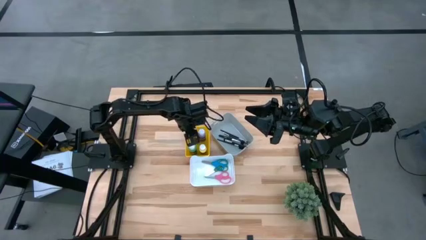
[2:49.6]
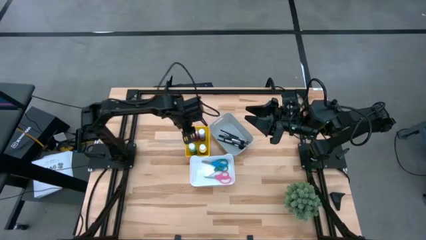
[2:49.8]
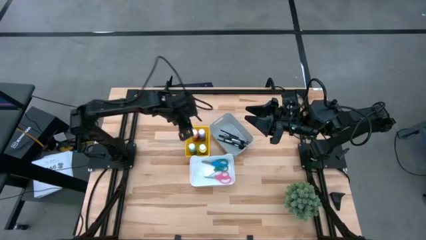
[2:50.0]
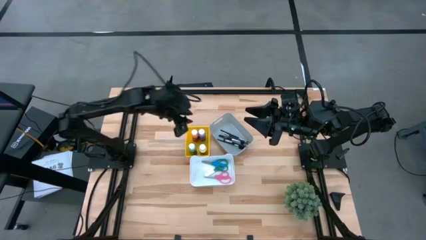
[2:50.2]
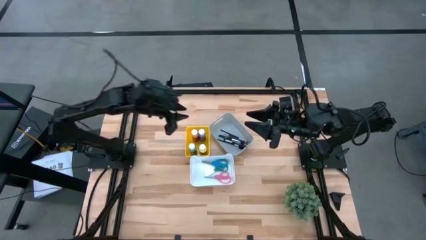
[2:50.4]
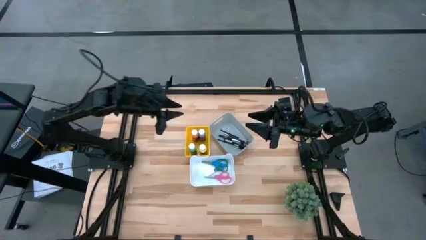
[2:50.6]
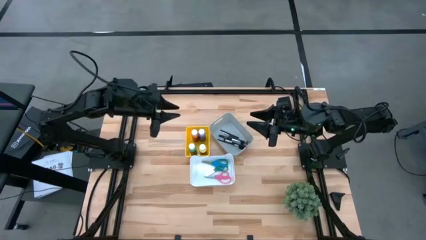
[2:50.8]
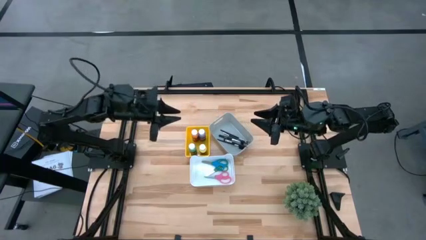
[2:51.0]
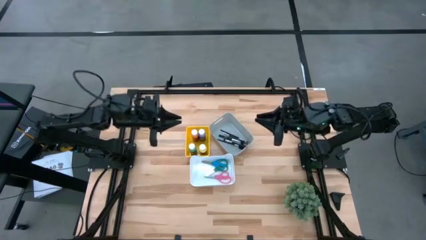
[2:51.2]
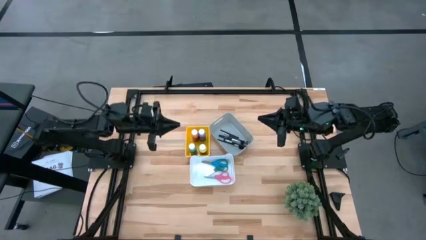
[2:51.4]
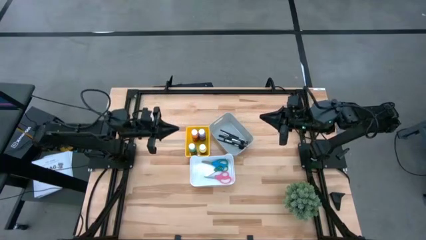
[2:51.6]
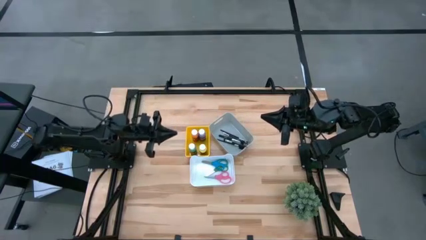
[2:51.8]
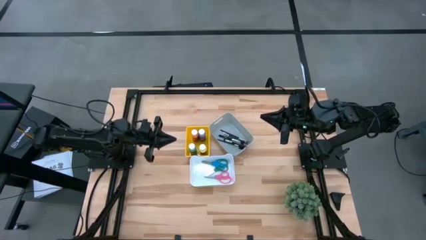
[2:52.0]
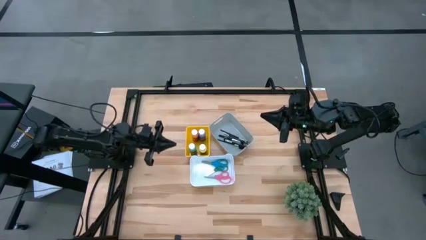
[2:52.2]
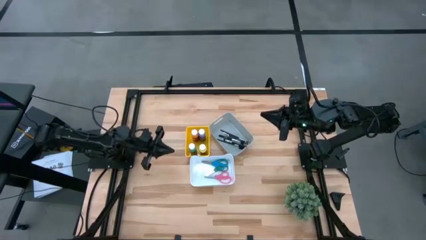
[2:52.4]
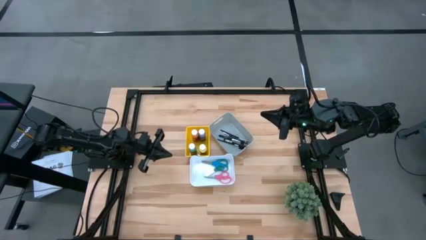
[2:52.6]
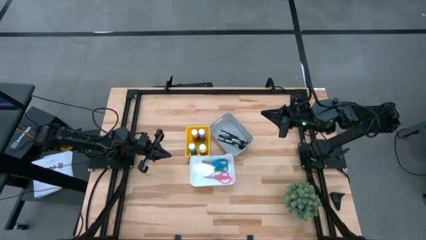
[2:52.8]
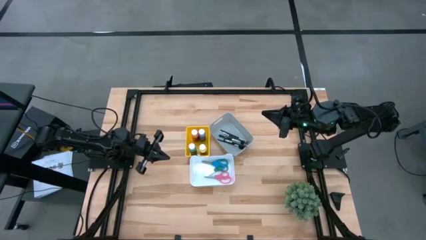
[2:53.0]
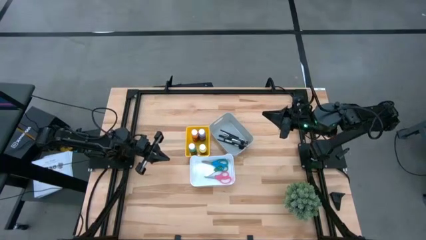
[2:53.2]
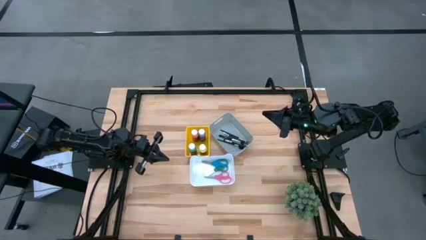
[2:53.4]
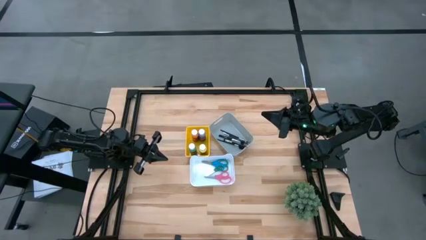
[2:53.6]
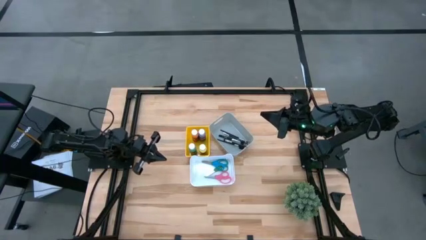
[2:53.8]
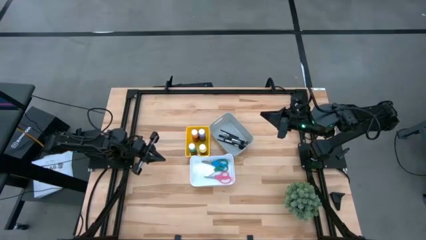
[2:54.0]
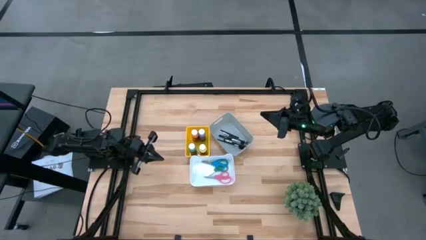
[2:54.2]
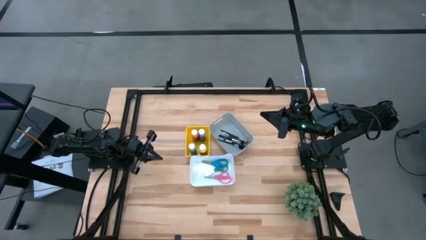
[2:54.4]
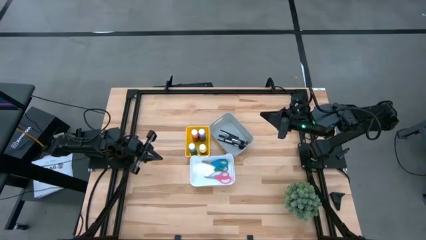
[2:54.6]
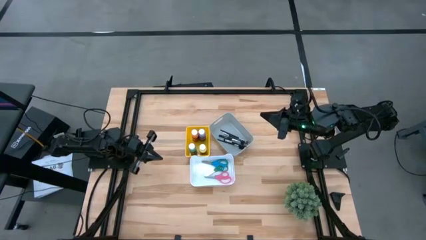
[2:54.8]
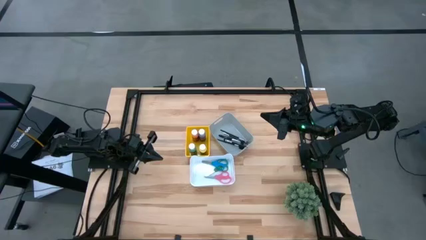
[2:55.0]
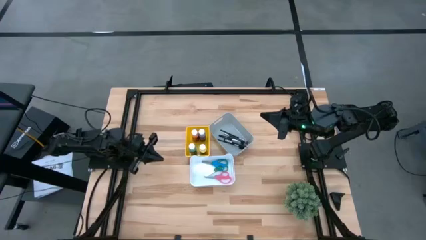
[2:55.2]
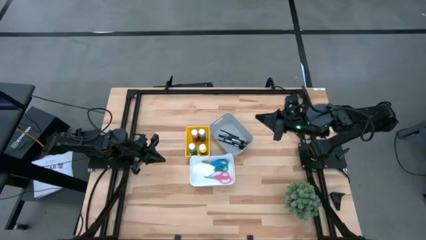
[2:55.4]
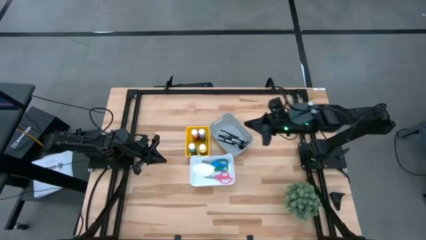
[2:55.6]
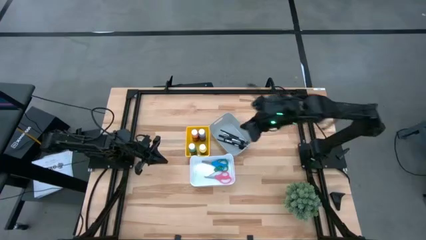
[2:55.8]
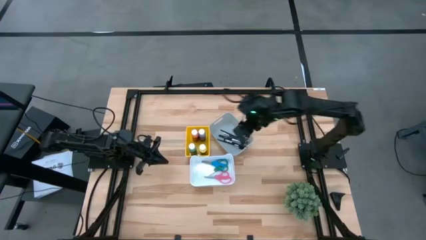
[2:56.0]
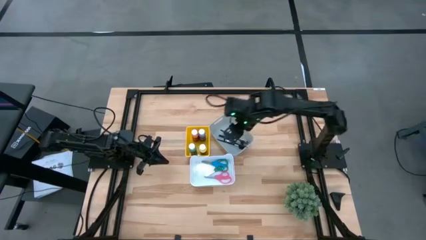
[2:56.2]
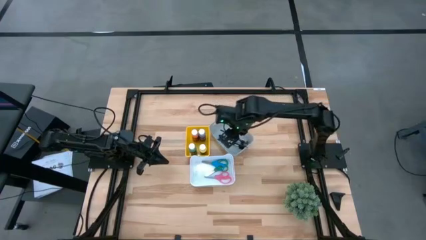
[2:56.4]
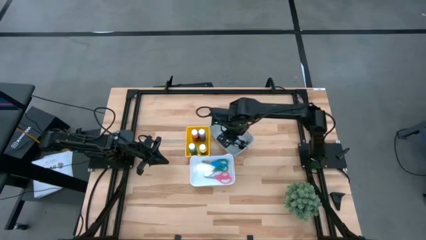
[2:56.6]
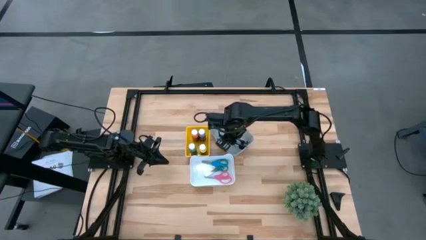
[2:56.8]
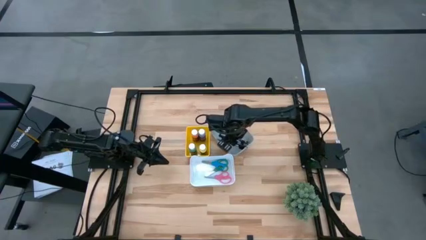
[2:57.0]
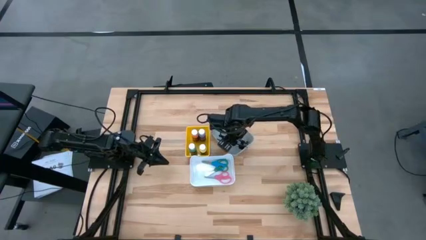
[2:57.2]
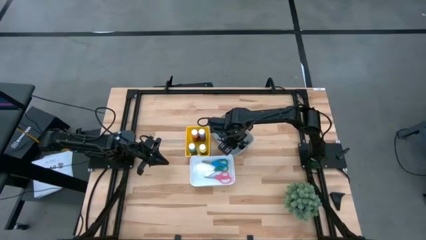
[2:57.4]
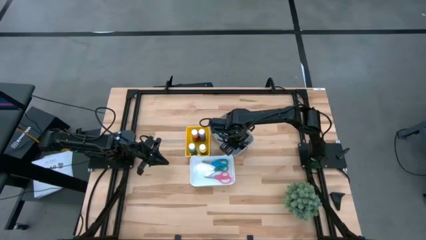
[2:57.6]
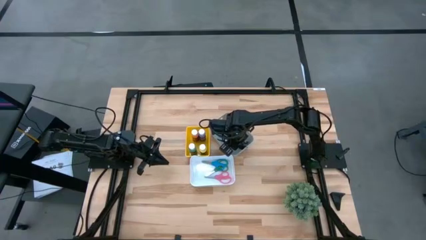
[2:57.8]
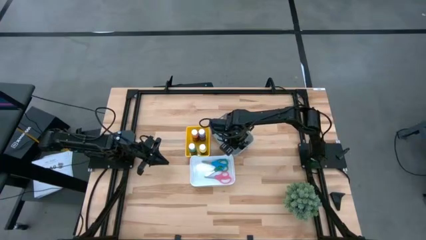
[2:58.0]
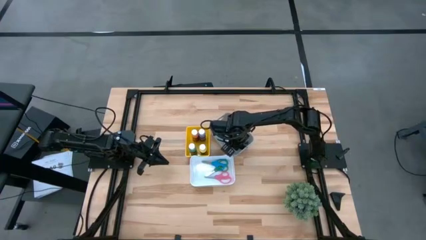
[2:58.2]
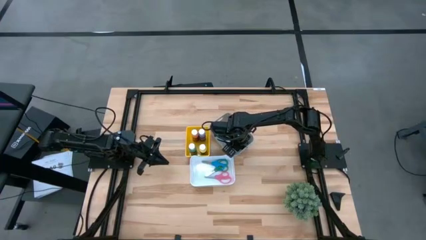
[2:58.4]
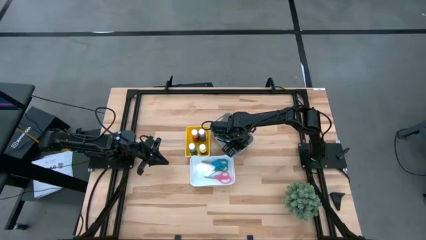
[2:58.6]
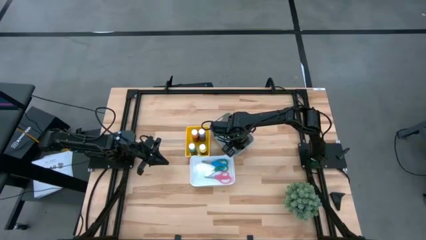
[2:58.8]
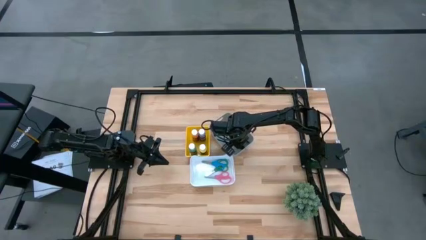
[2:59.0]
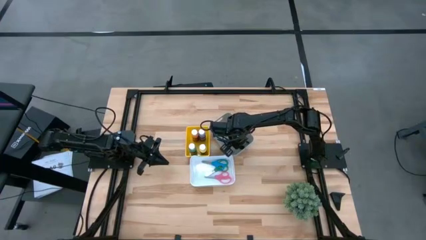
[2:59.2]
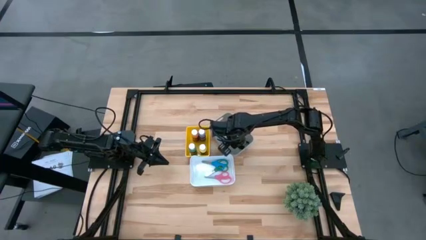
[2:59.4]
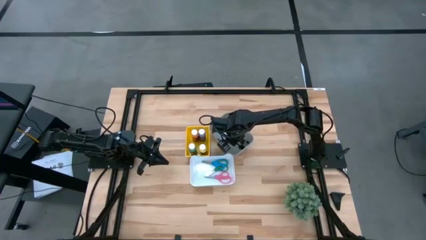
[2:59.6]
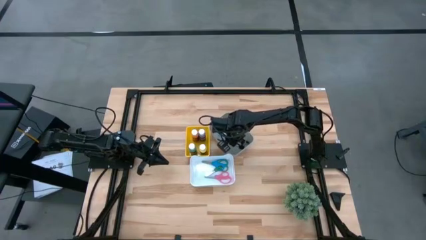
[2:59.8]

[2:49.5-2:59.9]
Task: Pick & Place Paint Supplies
Adjust the foundation brush into the gray bin

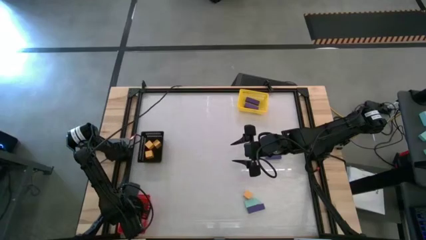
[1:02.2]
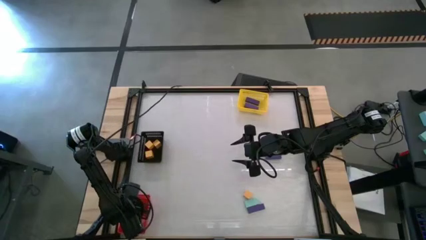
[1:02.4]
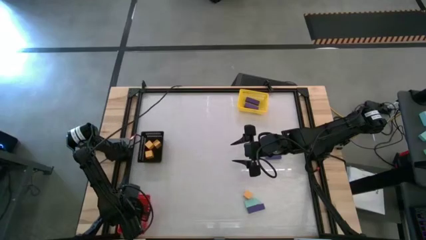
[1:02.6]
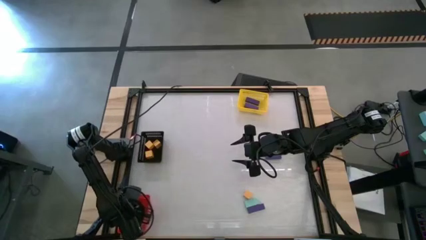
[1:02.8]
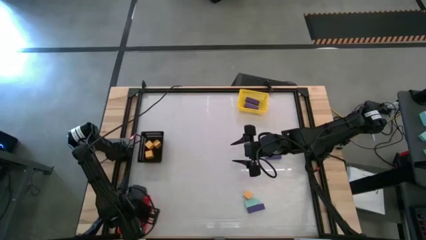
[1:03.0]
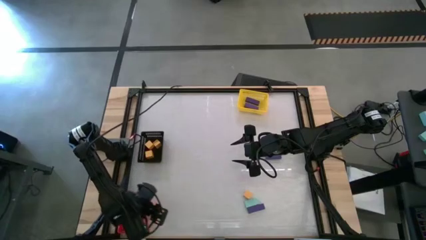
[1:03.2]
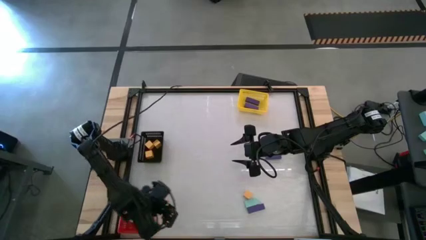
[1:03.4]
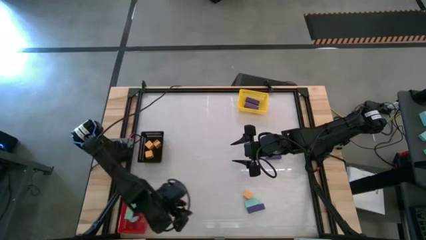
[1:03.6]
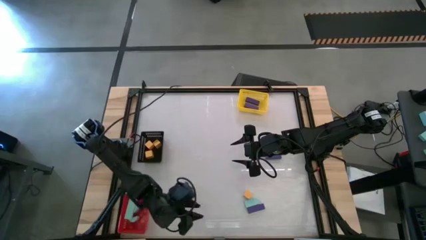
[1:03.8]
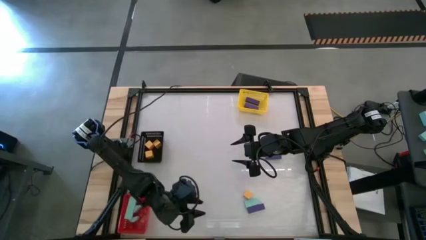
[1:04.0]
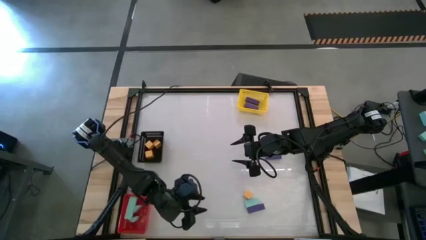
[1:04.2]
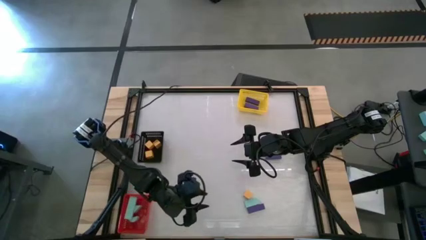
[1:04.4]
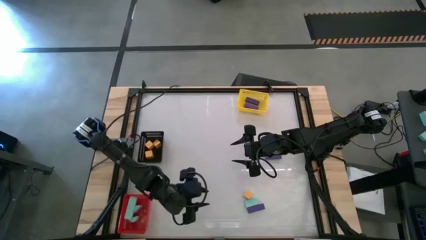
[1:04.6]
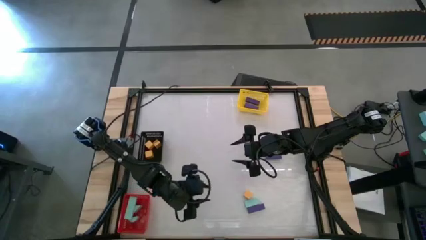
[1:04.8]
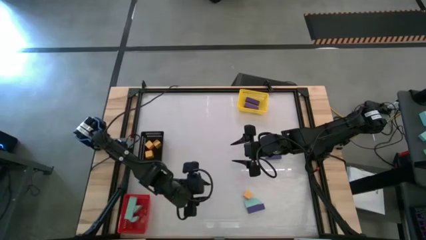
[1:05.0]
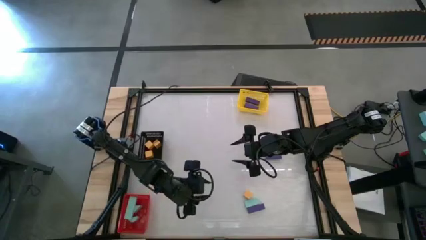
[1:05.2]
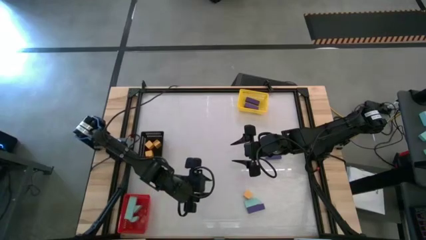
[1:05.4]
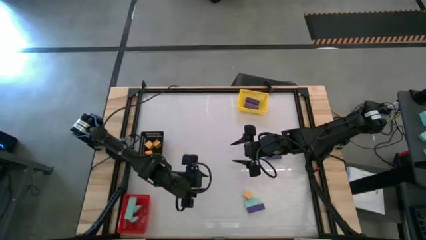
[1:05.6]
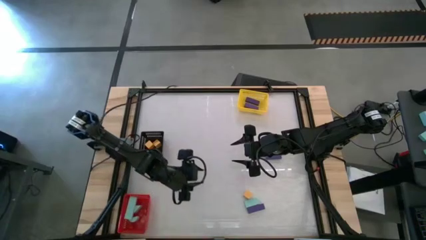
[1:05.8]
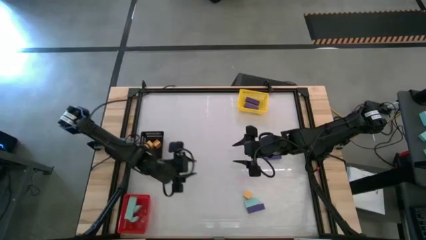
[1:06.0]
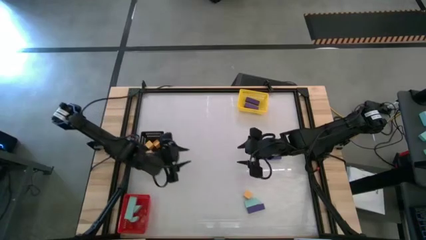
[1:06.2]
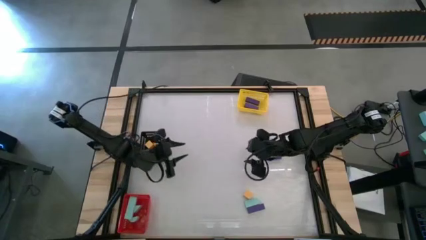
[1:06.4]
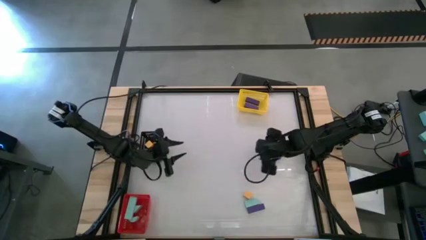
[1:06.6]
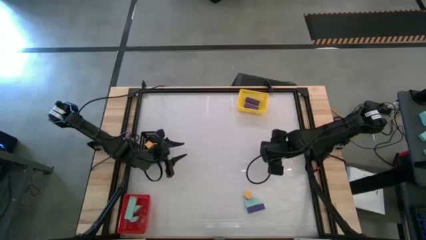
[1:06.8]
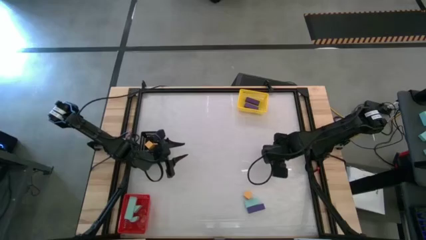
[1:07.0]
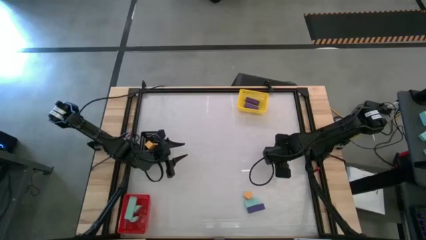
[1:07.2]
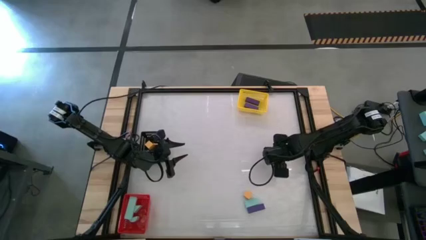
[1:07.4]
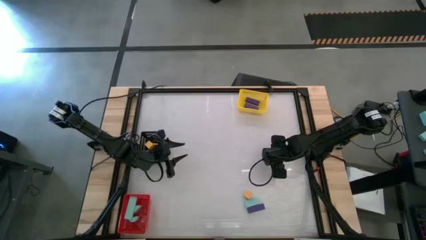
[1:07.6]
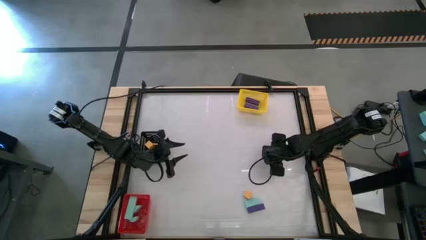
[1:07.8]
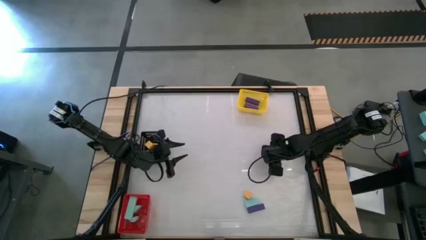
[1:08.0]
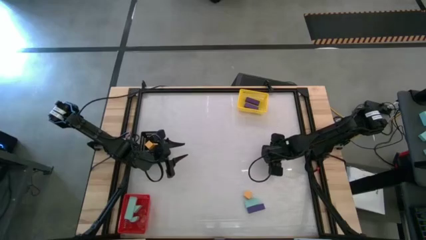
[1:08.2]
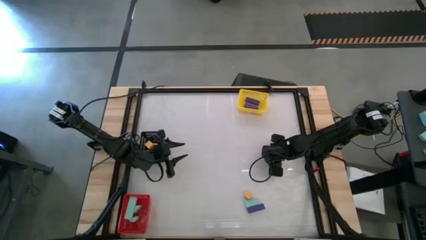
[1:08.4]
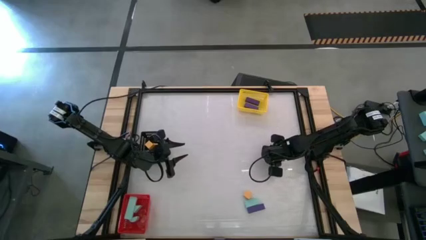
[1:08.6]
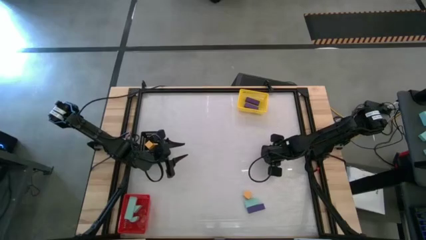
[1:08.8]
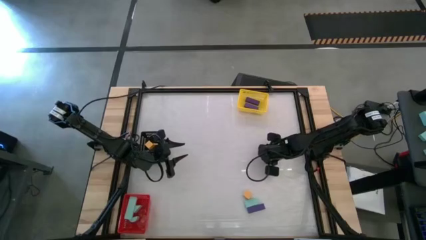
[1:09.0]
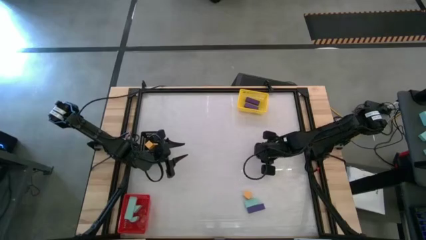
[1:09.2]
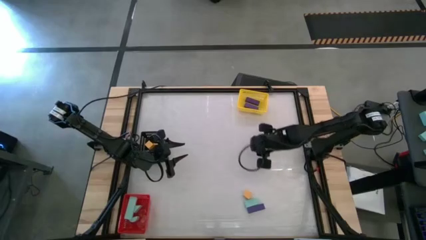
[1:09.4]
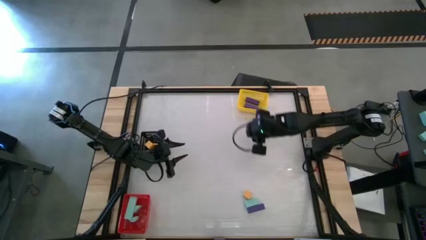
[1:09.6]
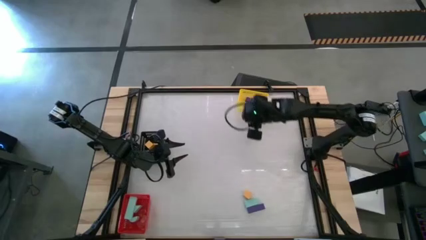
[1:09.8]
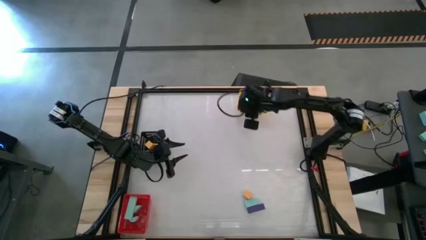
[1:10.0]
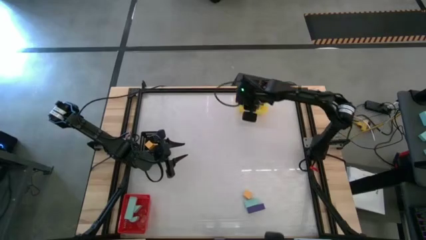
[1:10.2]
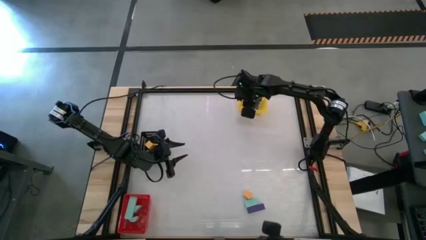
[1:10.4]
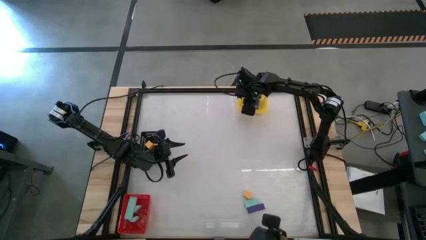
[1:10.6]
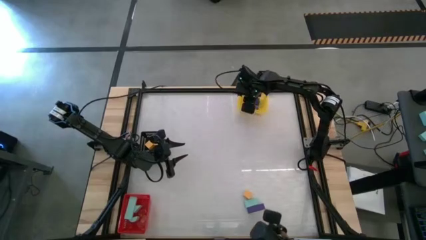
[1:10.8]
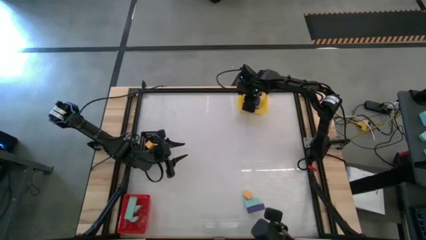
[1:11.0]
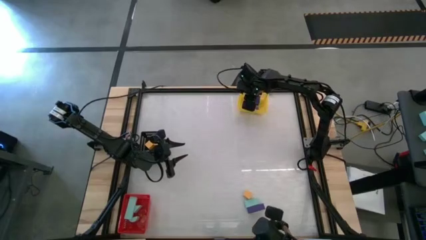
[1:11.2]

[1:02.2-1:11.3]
Task: Sort & place blocks by color
Put the purple block into the yellow bin
